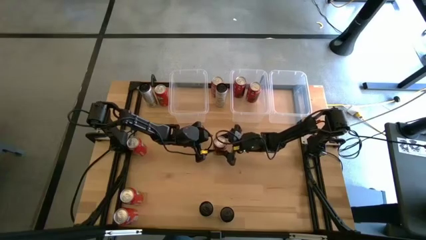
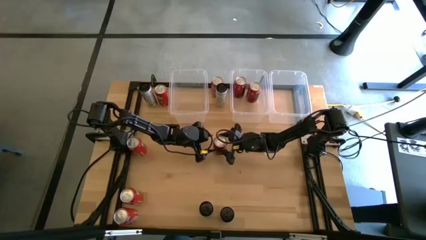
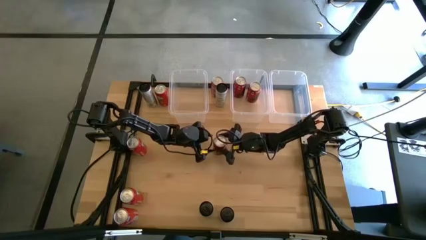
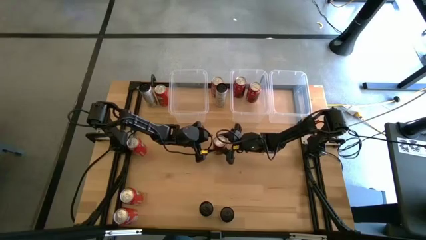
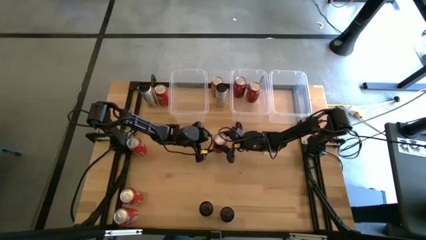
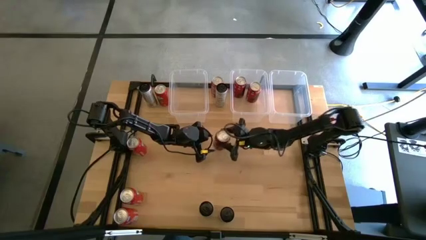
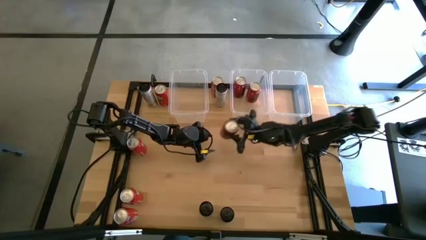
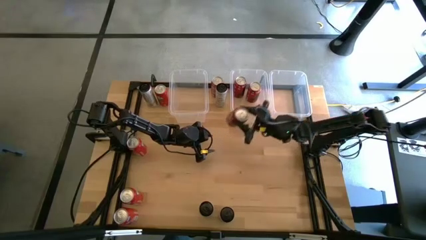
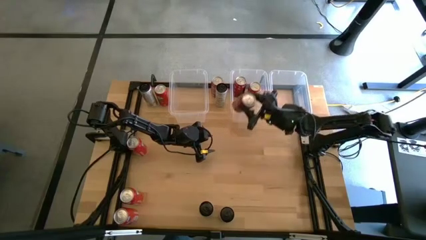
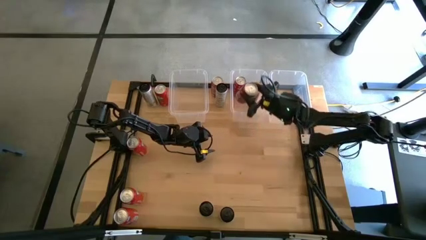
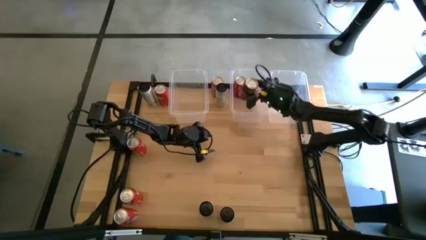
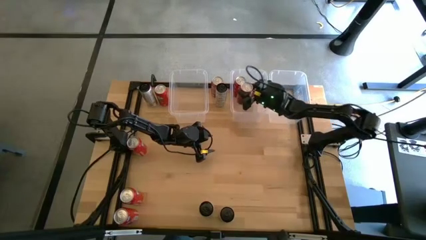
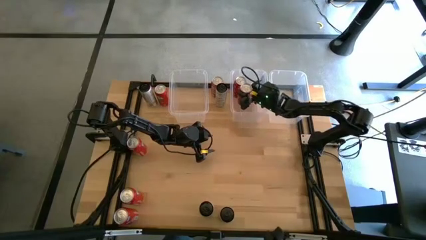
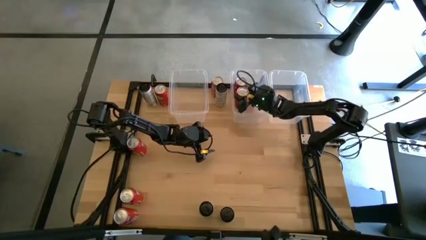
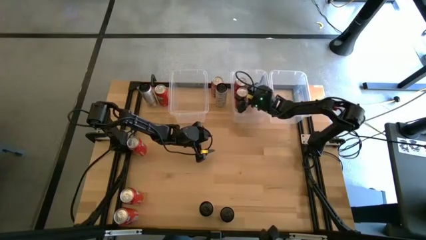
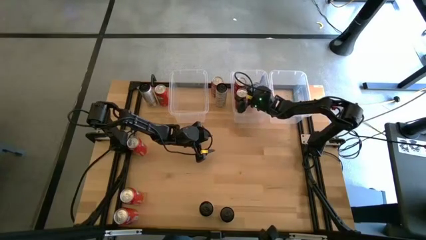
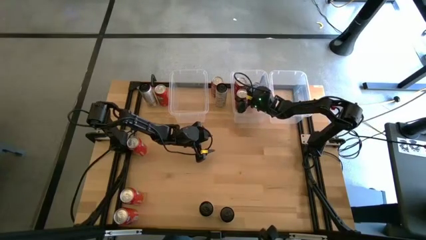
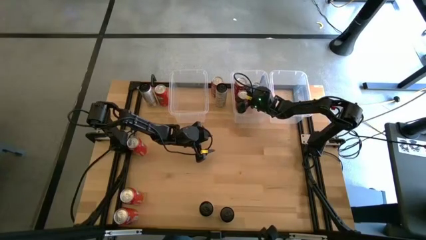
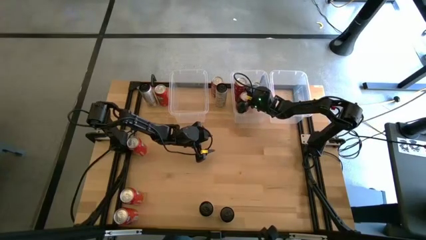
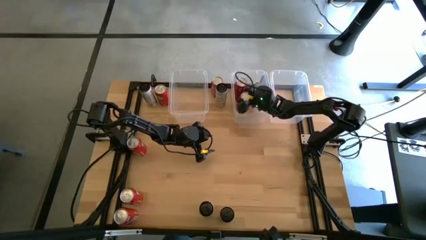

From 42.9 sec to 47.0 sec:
Task: Sort soda cans
Put the bottom red soda can into the center transparent bin

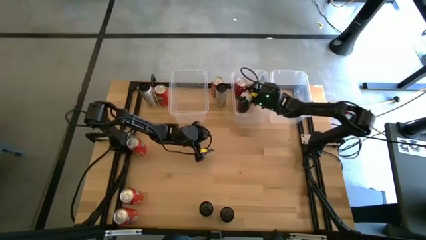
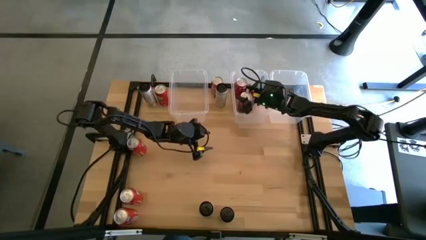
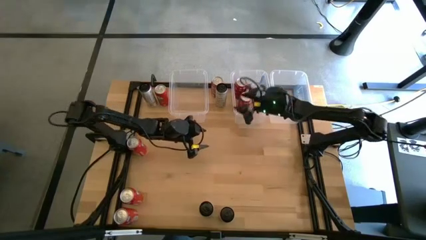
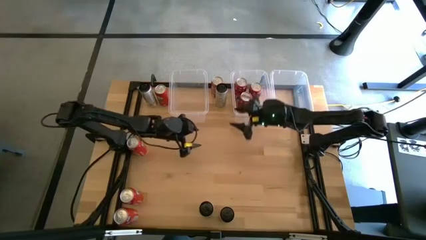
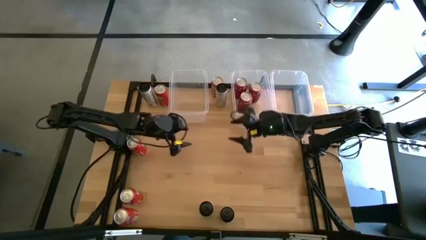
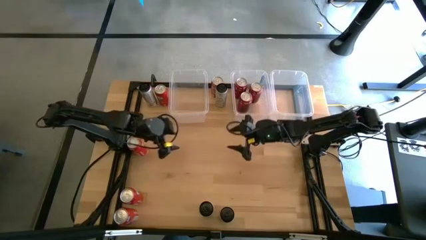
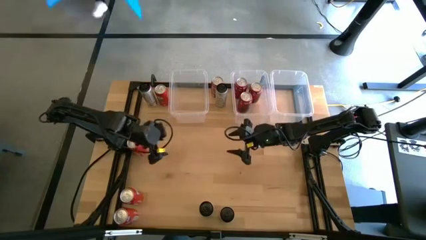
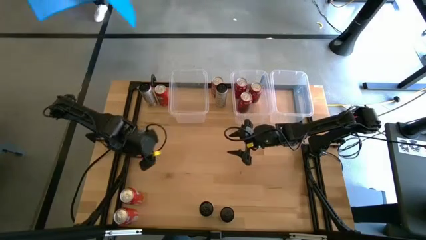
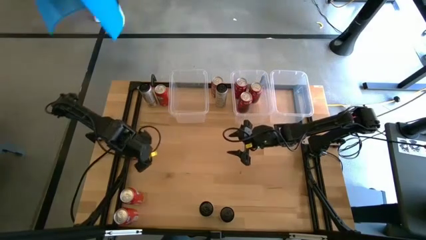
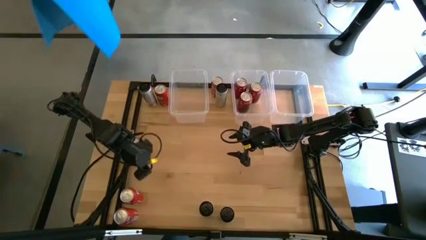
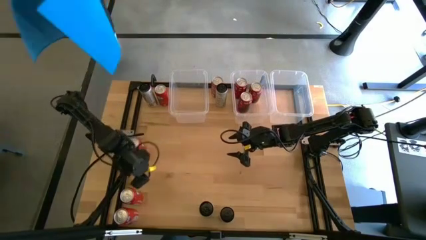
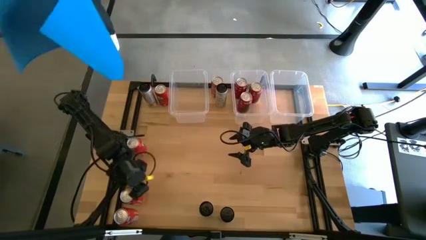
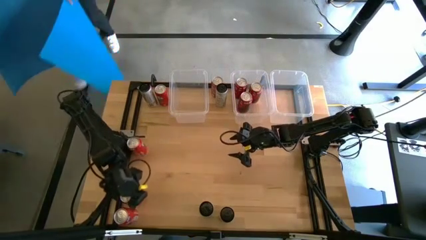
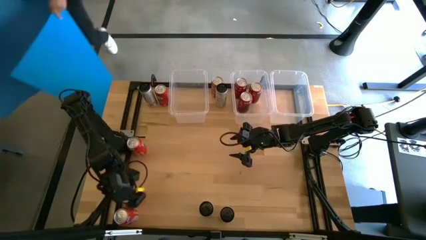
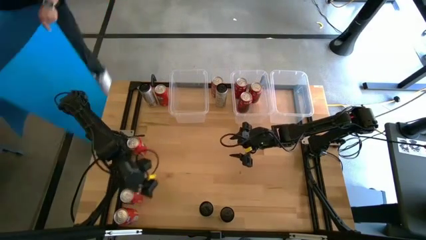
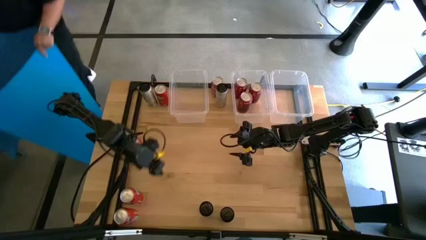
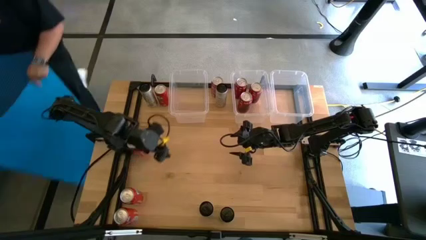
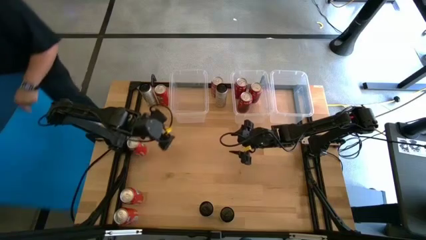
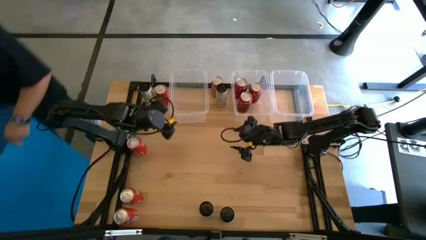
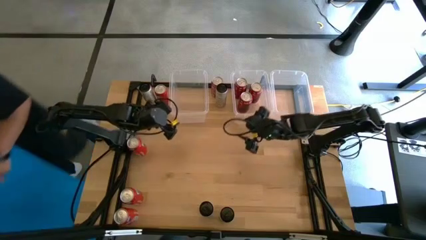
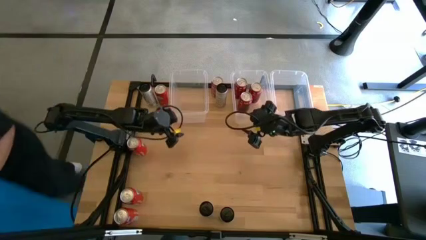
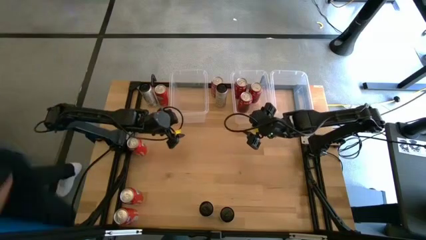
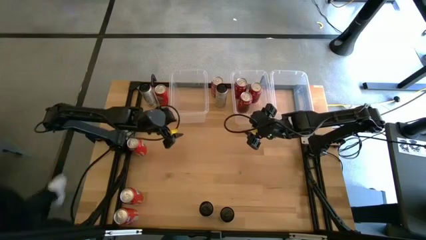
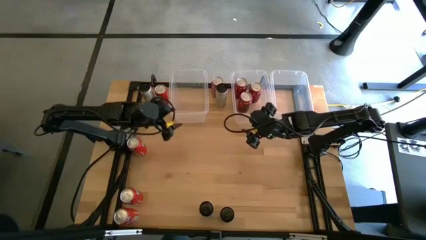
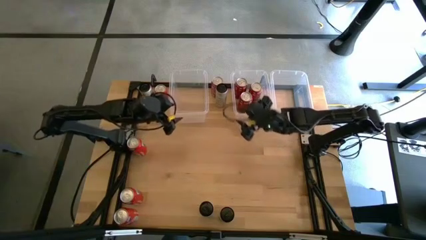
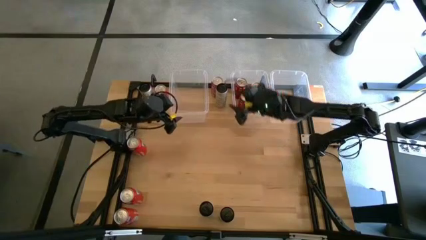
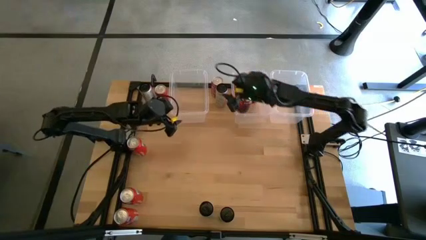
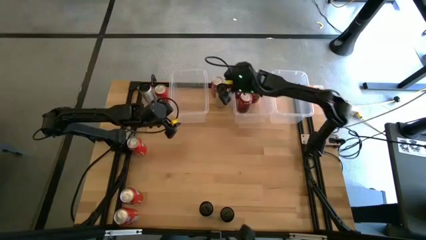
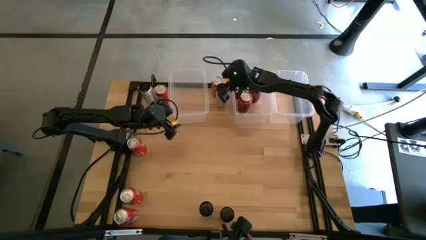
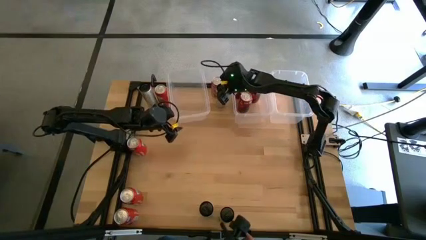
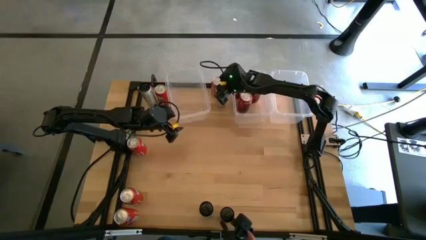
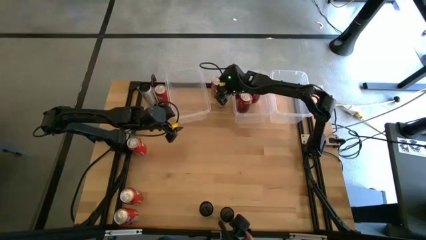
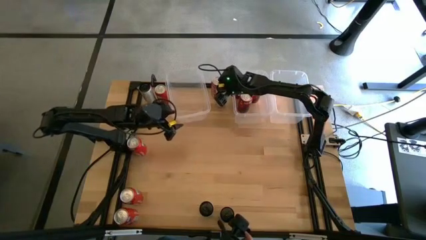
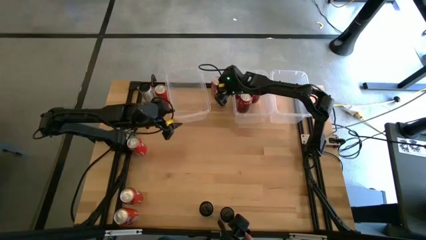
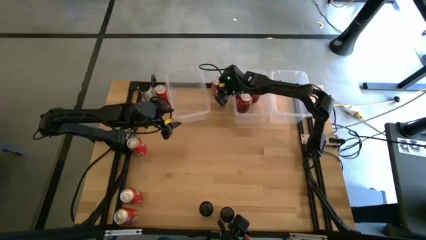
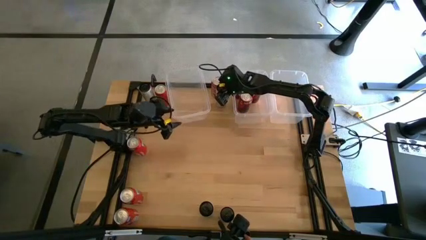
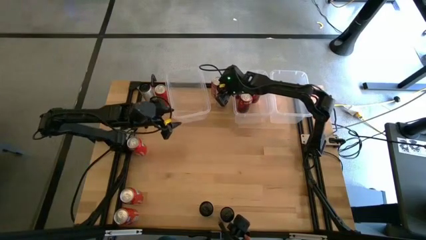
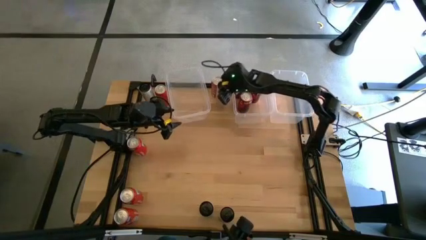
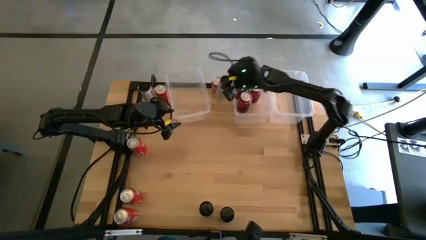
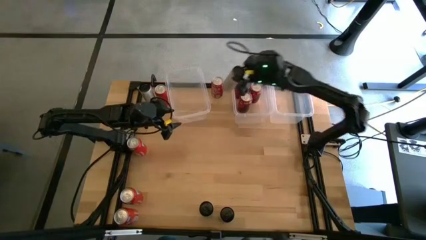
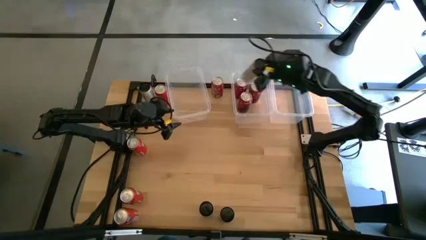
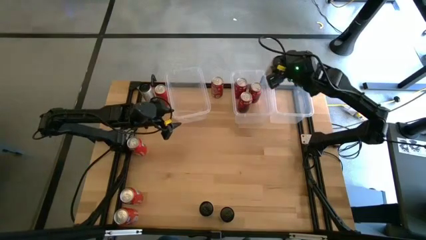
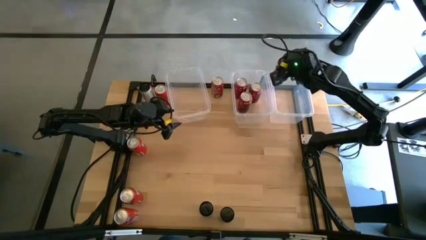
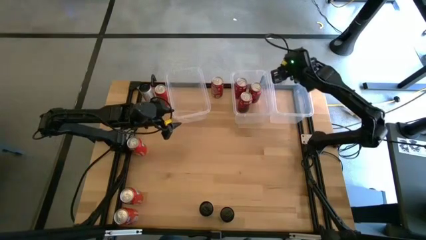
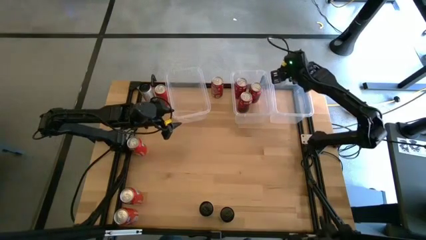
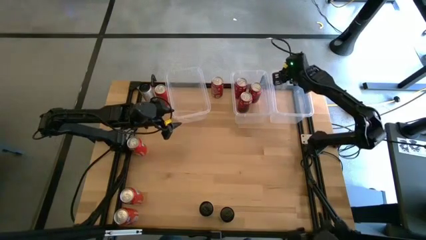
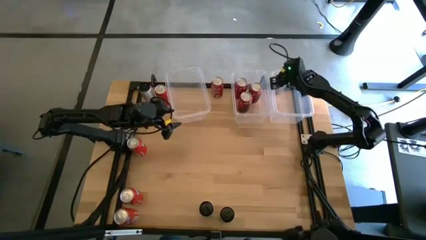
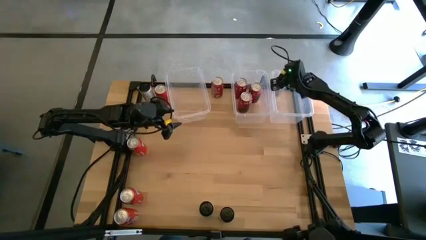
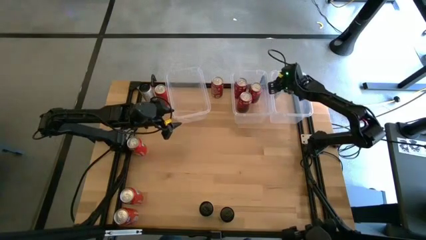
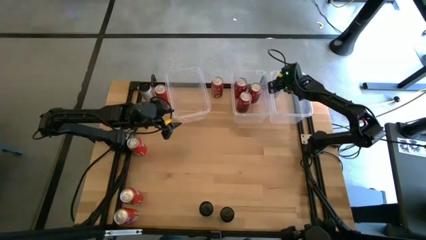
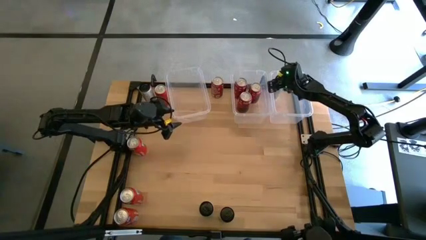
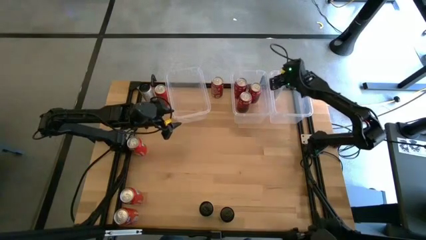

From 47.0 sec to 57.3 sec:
Put the top right white and yellow soda can into the right transparent bin

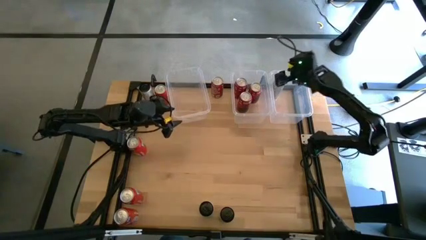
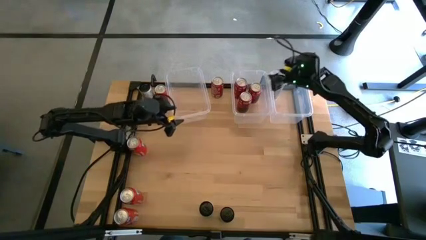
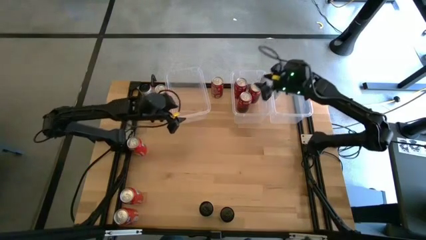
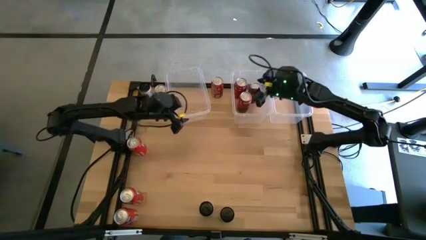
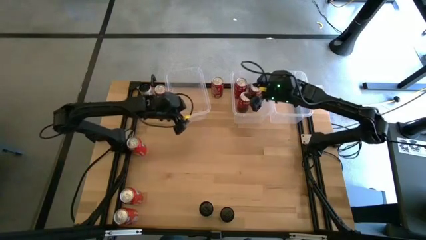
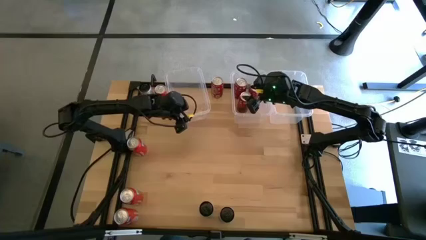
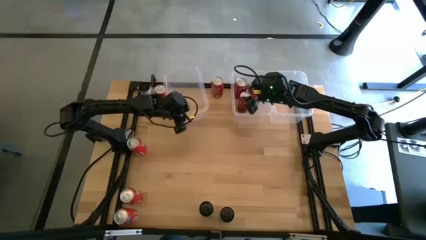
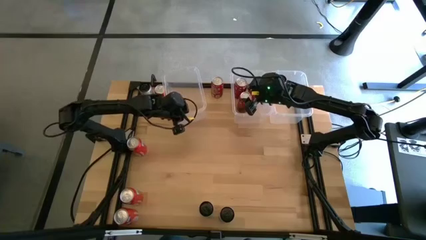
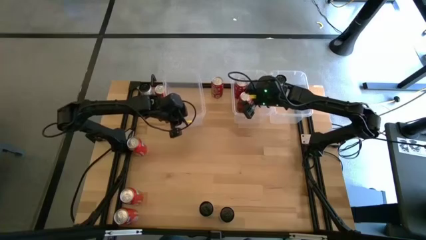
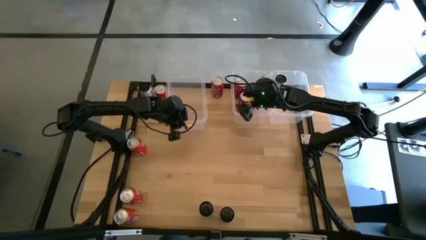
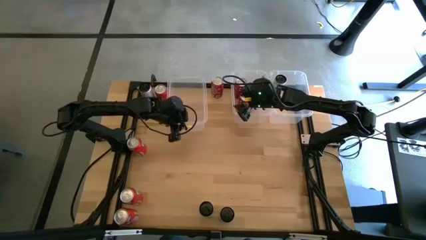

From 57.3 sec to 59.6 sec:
Adjust the left transparent bin
